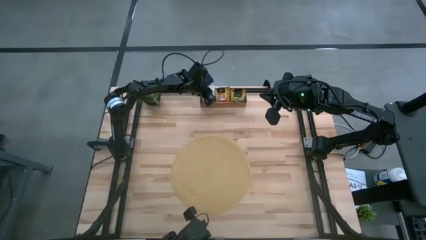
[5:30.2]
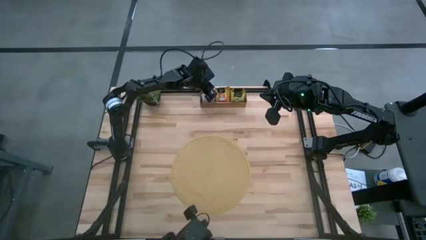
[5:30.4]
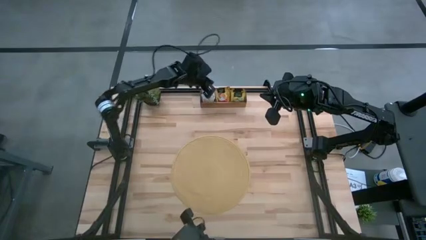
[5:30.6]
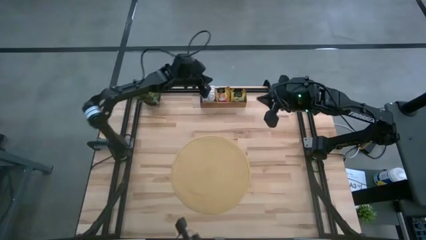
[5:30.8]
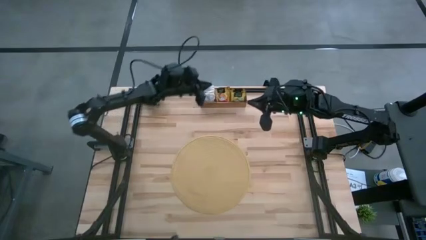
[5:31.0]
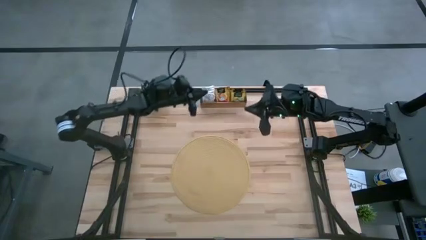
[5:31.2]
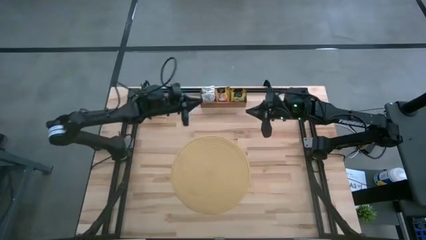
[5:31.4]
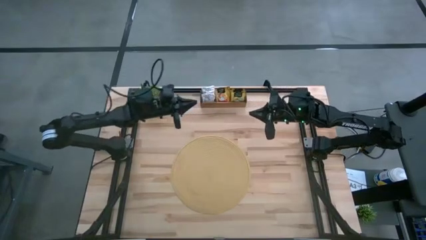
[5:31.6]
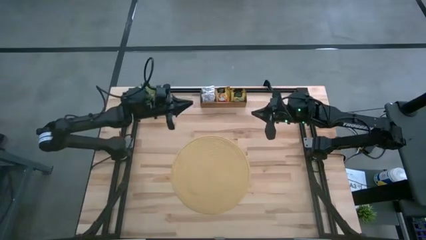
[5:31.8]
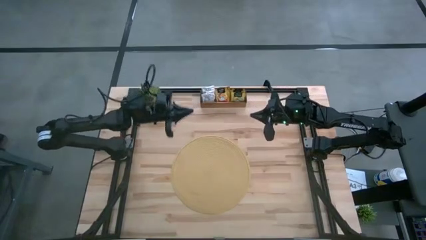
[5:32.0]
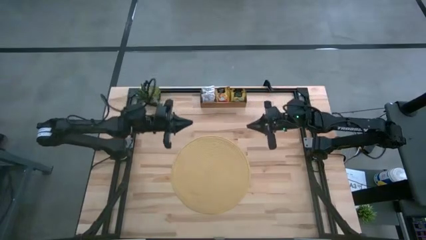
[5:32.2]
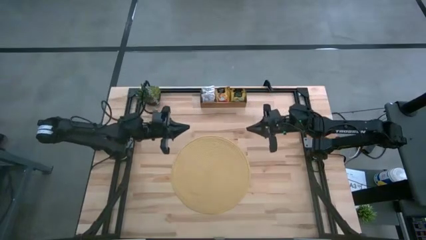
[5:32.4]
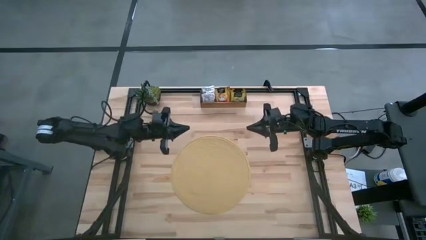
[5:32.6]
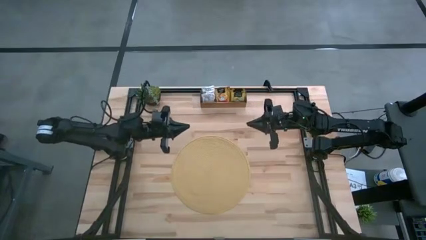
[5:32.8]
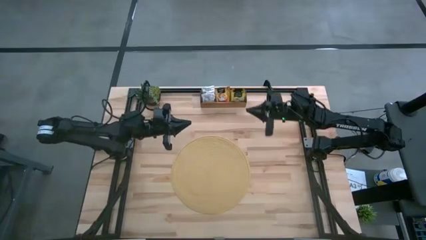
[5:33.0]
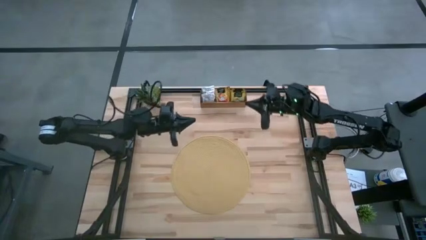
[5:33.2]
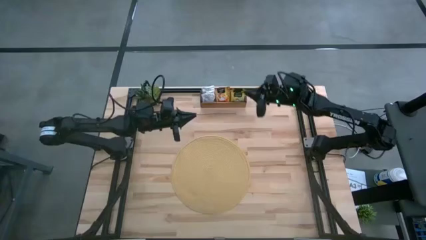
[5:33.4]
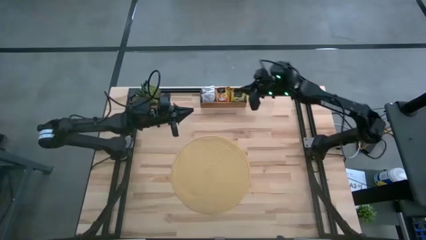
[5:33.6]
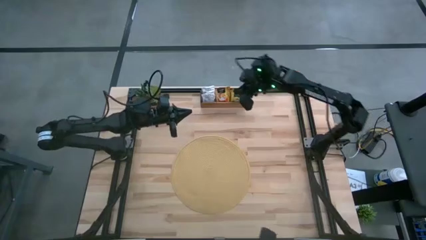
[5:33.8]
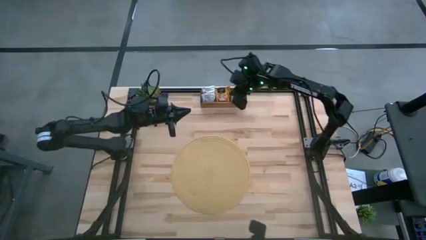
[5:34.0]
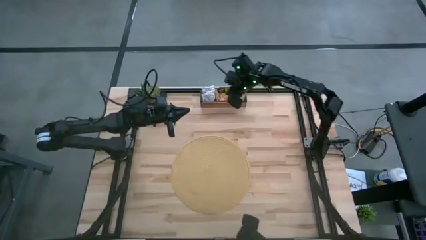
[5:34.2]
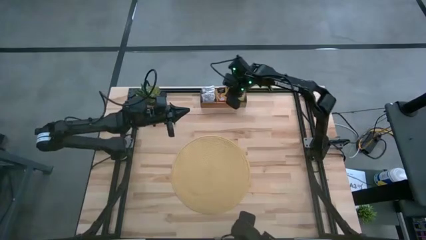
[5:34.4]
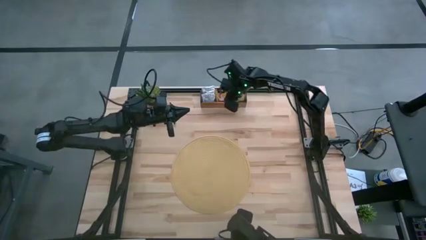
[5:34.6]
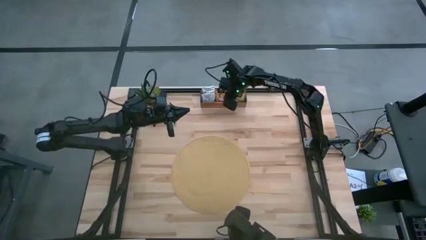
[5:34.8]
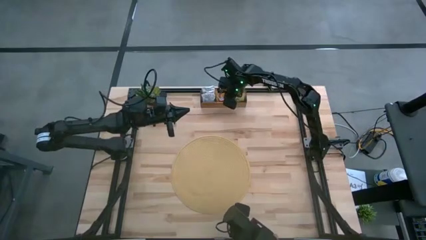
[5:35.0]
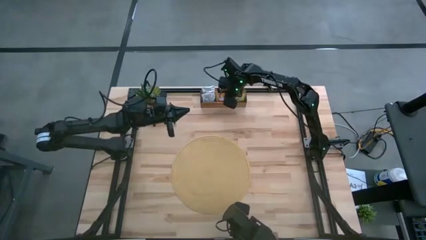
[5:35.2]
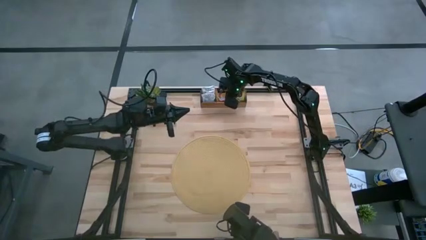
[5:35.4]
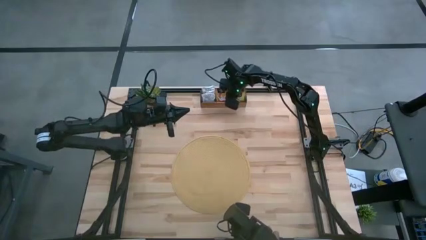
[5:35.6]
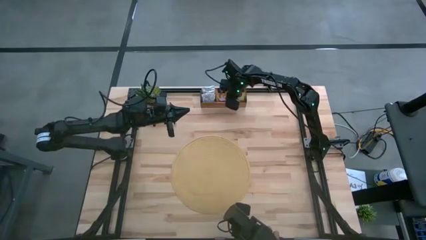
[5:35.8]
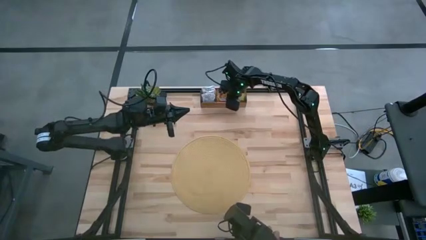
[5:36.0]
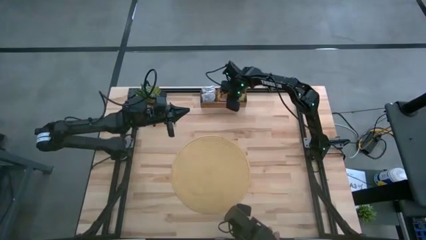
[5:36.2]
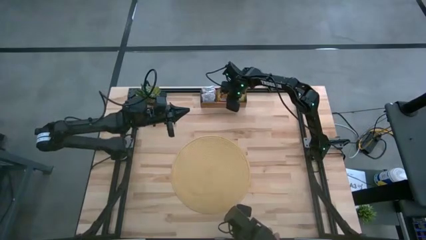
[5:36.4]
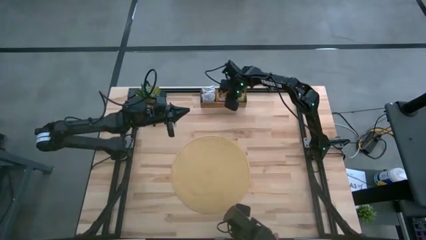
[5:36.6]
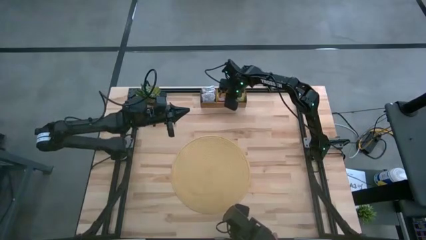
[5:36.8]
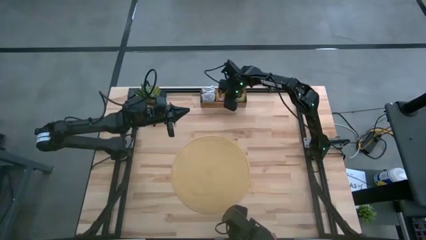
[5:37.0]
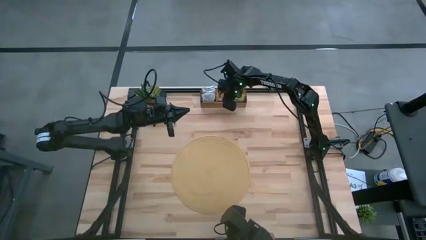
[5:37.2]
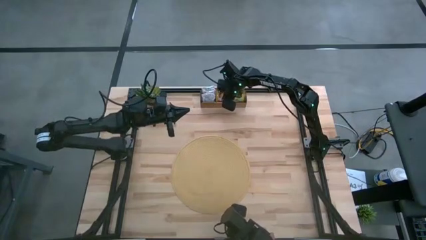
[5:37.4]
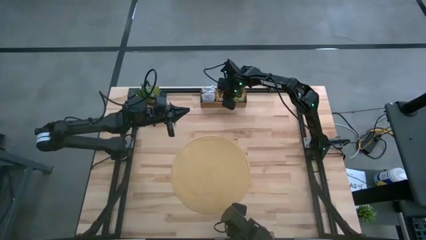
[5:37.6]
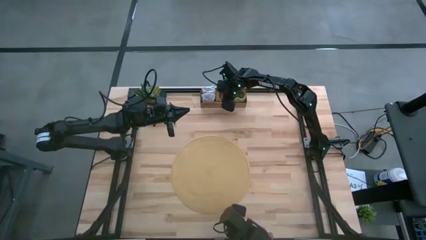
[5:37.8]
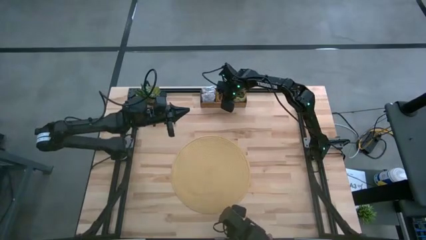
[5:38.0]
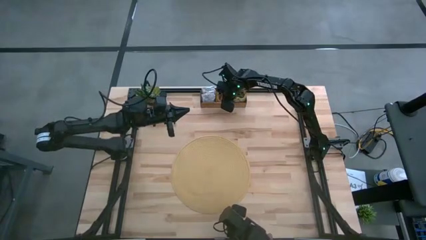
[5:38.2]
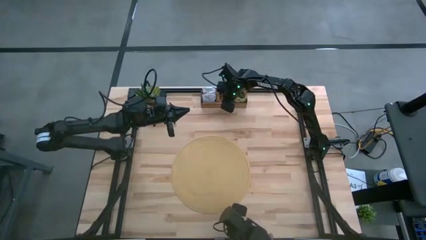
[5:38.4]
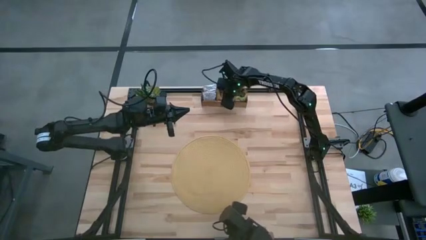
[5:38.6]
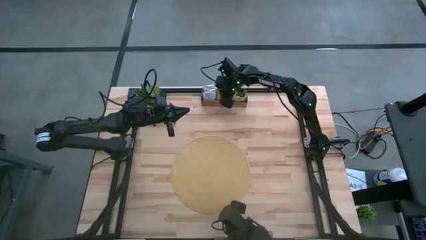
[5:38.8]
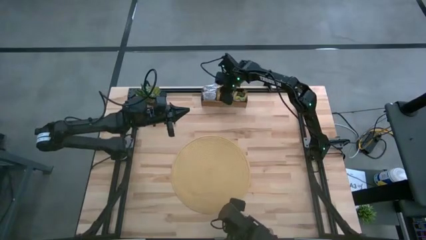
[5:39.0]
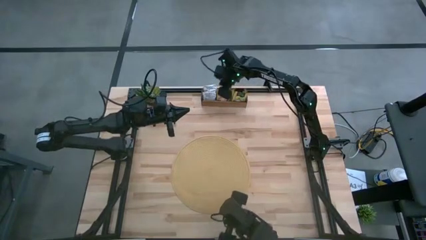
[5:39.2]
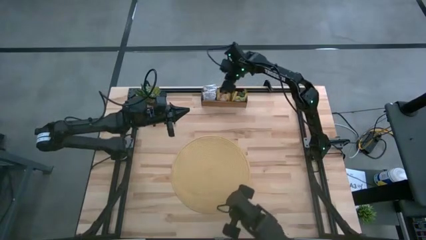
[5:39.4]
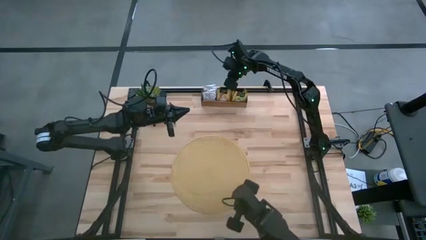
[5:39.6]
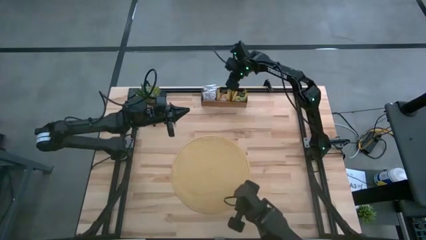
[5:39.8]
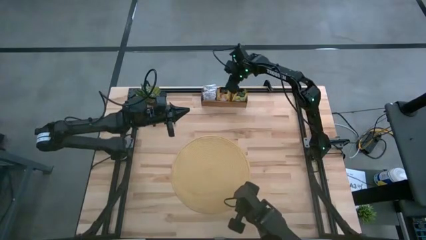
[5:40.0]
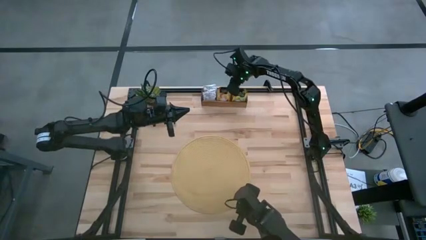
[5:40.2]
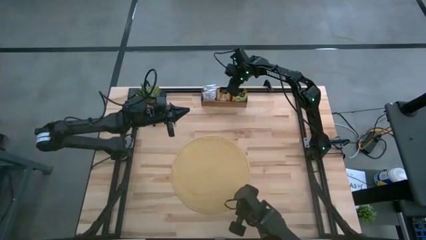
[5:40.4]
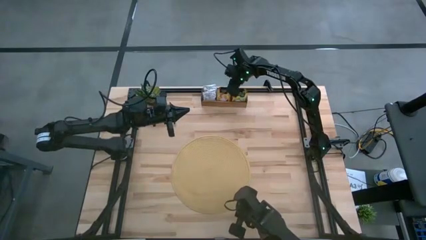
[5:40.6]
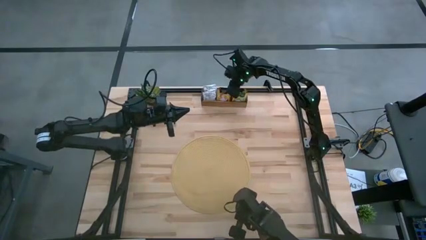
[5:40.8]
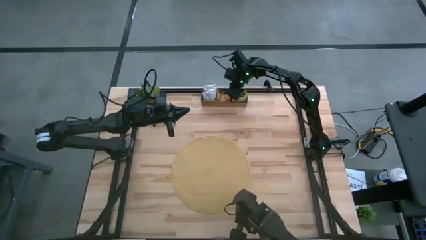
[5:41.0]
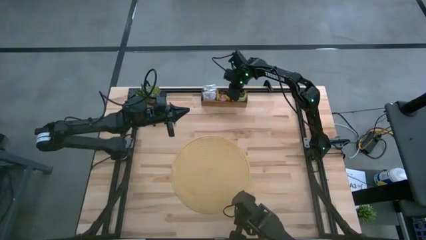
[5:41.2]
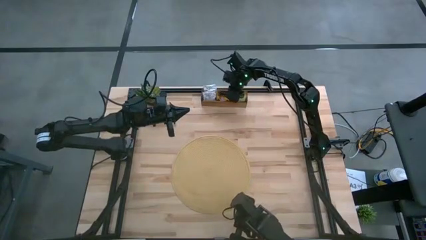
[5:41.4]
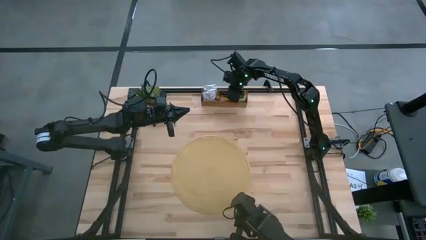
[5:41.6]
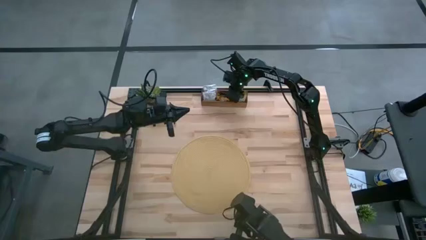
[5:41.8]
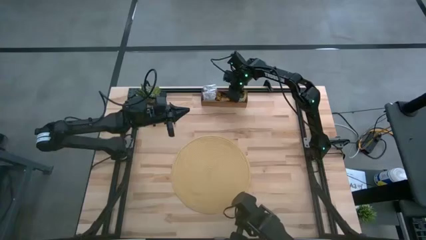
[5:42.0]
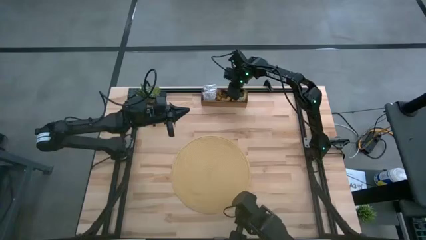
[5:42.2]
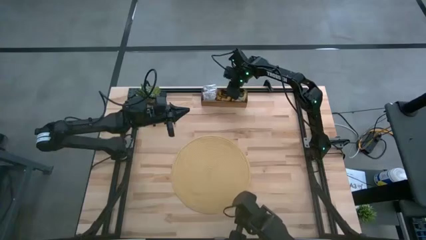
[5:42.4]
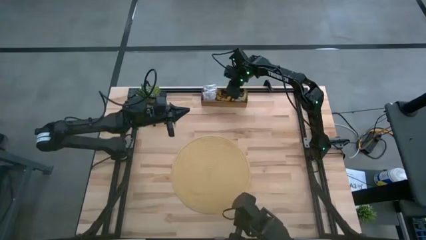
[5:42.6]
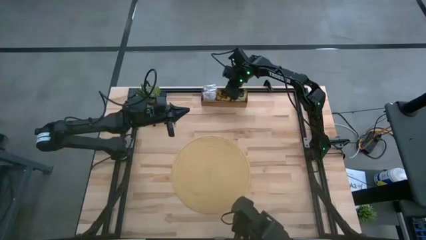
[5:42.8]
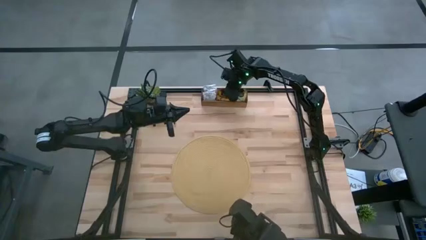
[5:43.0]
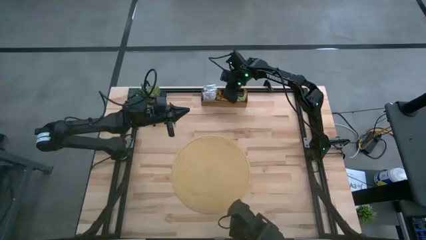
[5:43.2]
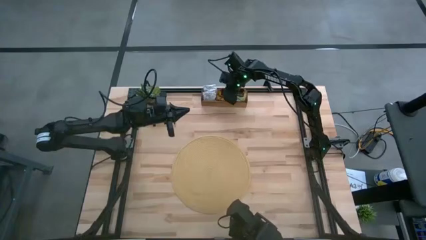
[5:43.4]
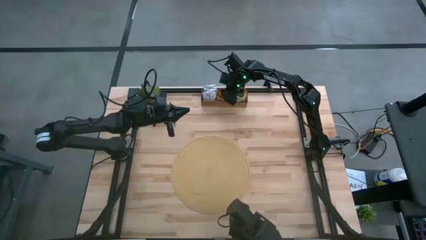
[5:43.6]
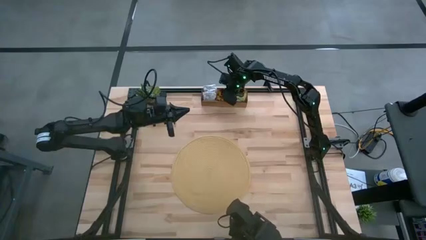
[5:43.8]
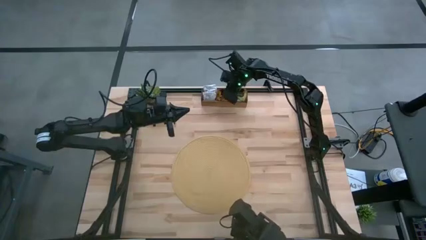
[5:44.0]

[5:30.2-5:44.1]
Task: Pick & Place Tea
Adjust the red tea bags in the middle section of the wooden organizer

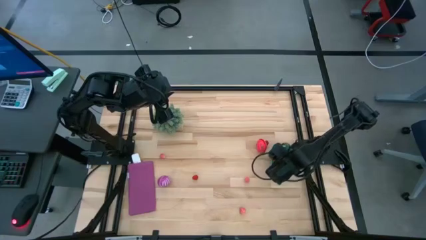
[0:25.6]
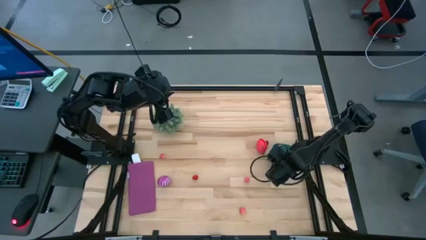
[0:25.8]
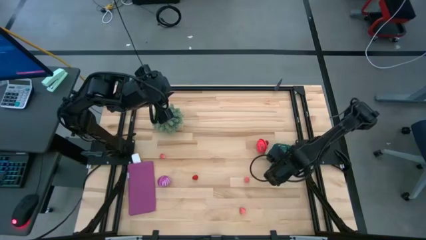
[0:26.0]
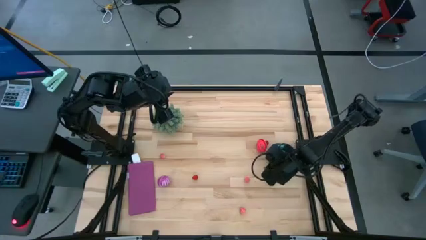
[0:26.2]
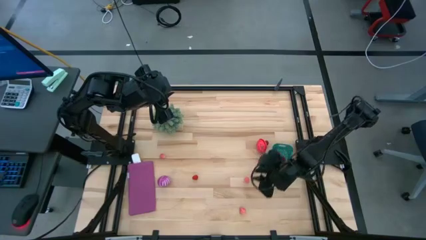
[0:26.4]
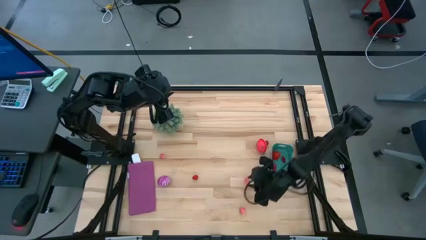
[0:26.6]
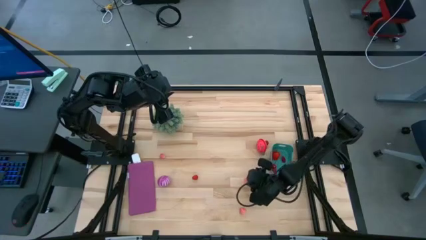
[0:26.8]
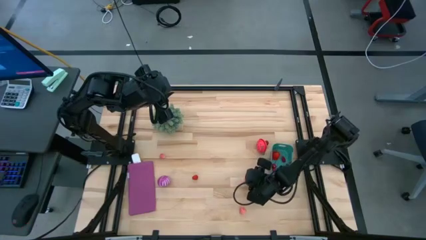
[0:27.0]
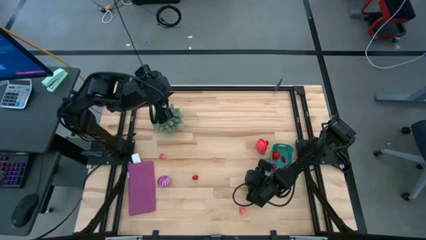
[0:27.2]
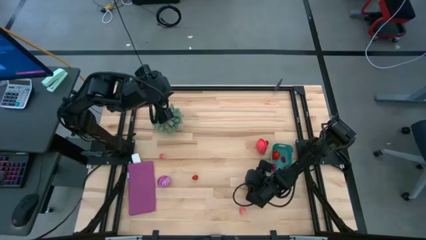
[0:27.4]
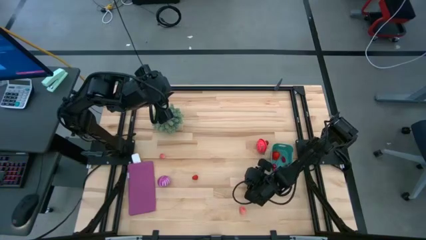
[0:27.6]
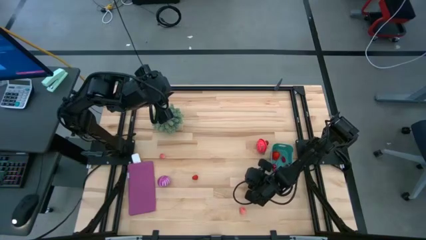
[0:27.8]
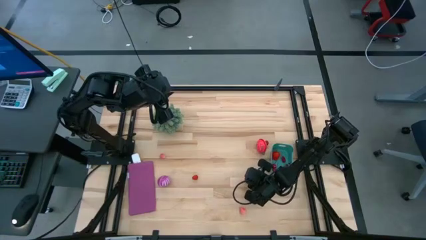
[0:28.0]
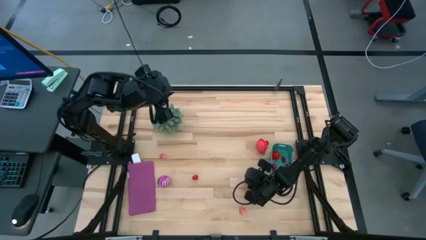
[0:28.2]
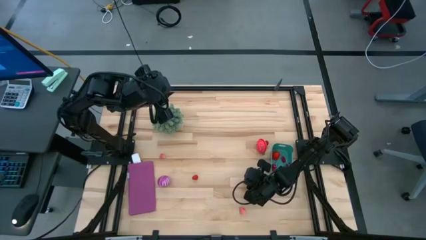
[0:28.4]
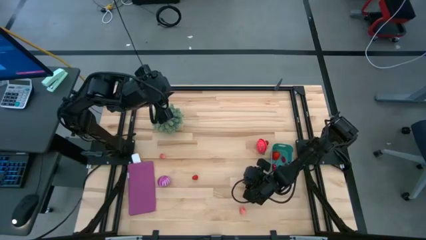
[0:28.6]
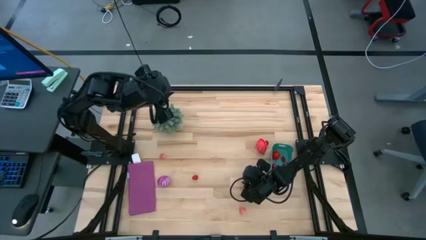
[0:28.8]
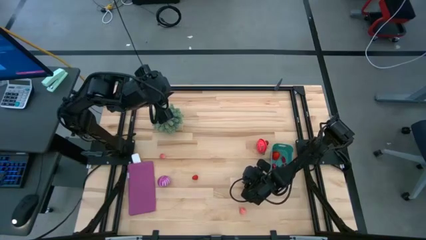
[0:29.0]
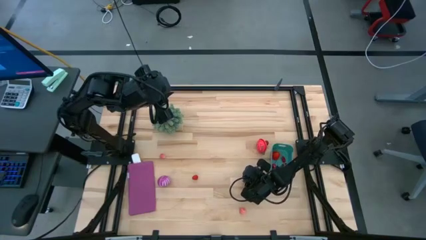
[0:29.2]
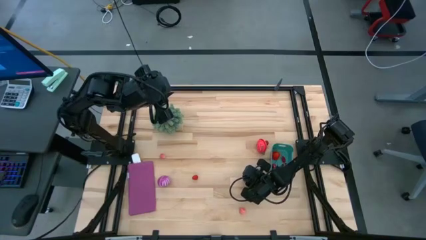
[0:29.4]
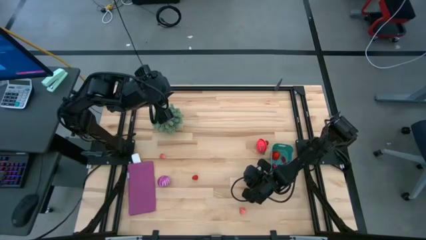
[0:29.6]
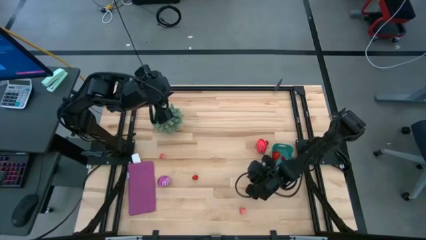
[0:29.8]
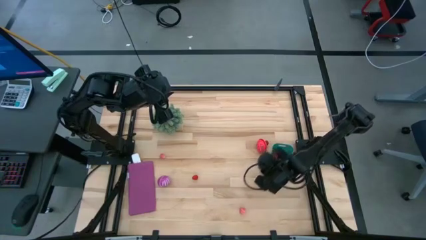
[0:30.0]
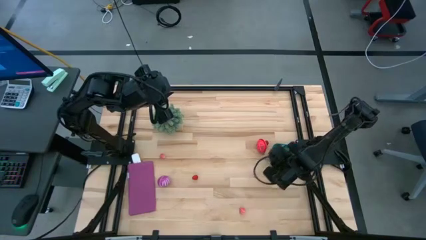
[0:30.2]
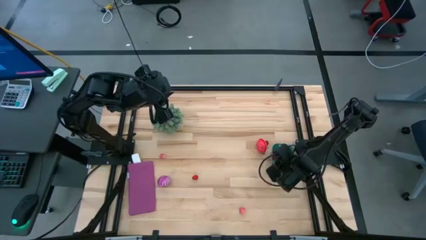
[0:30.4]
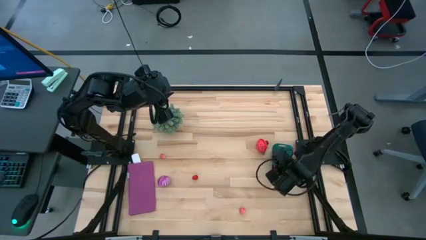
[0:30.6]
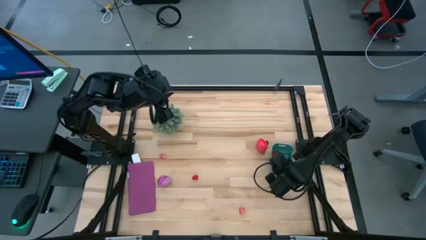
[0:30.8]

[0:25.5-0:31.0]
Task: Pick and placing Produce into tupperware
Put the pink peach into the green bin
